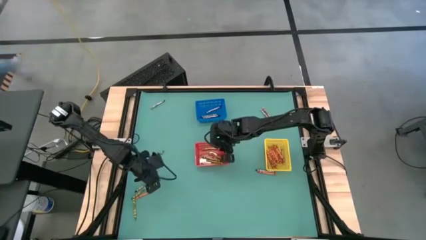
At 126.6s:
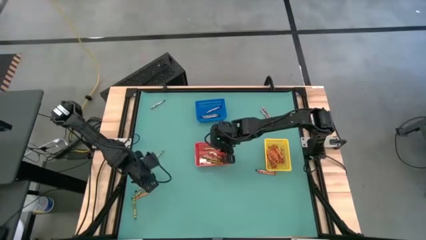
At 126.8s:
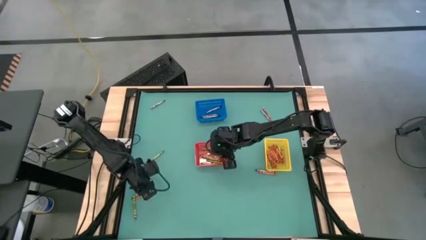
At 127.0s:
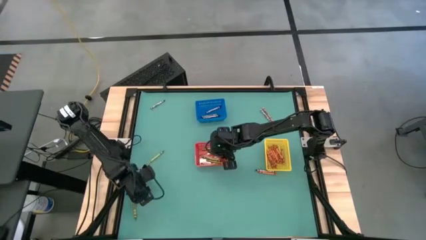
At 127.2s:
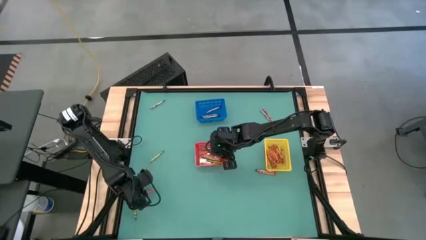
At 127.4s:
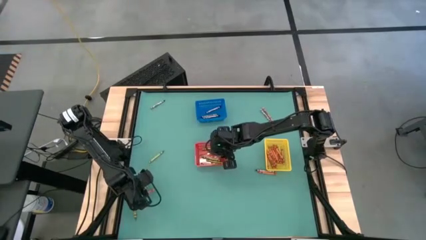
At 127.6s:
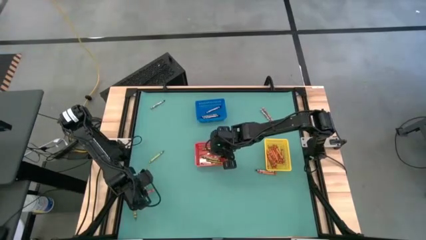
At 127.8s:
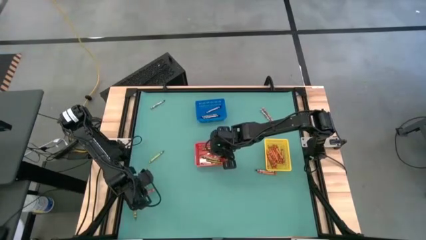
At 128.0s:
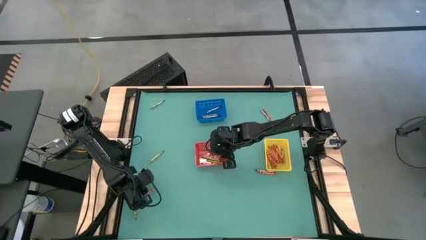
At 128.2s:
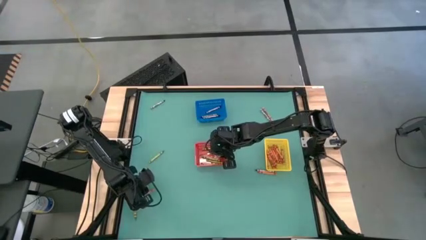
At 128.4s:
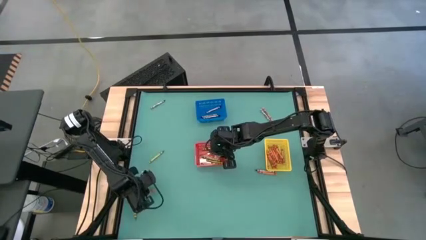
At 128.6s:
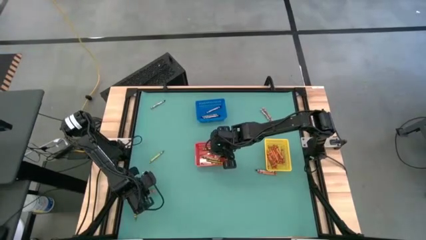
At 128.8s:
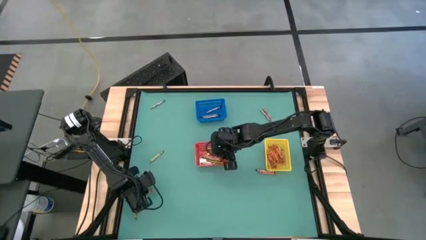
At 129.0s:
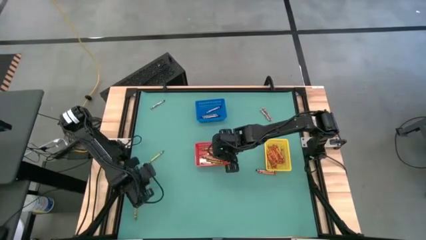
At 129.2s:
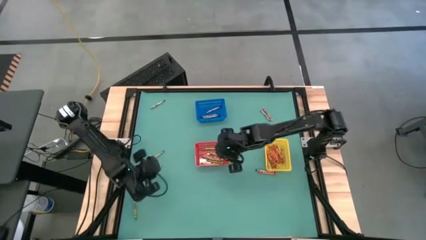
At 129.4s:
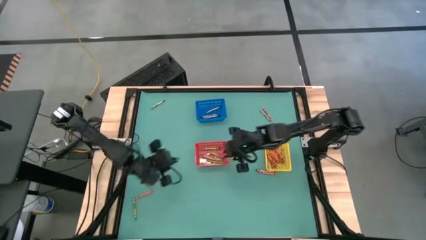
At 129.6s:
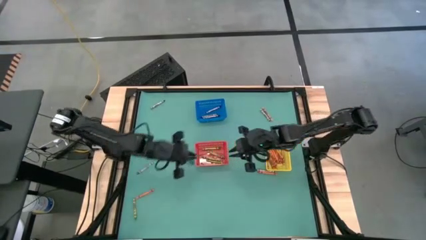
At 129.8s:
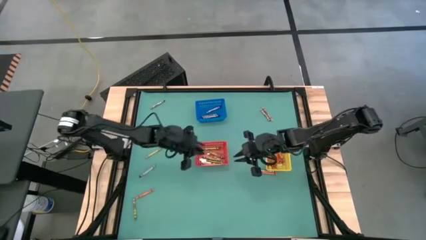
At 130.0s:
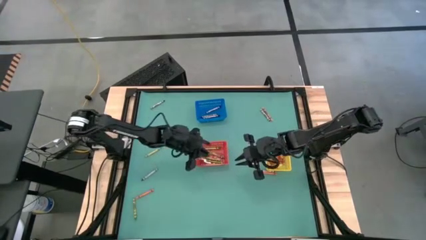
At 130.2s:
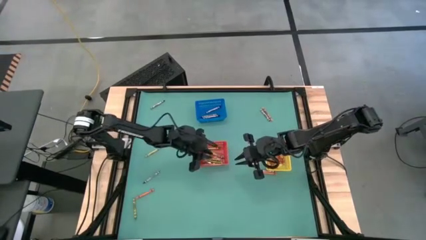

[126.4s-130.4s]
Task: Sort crayons
Put the green crayon into the red bin

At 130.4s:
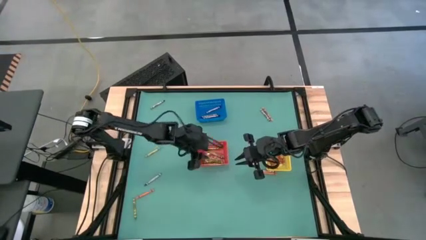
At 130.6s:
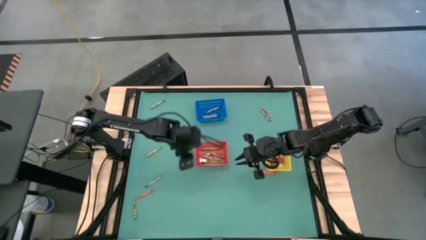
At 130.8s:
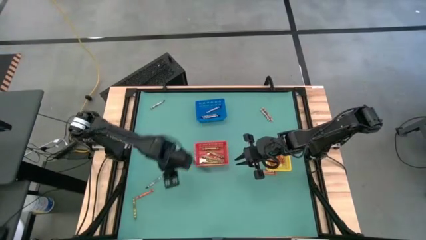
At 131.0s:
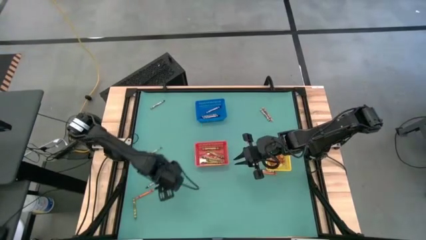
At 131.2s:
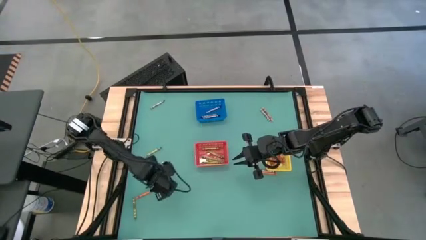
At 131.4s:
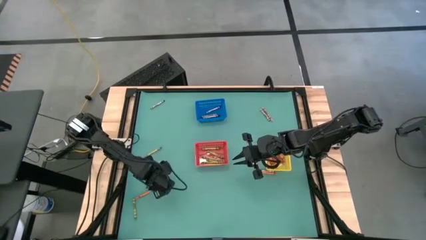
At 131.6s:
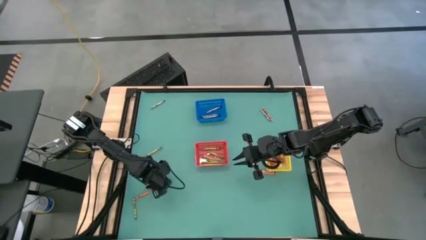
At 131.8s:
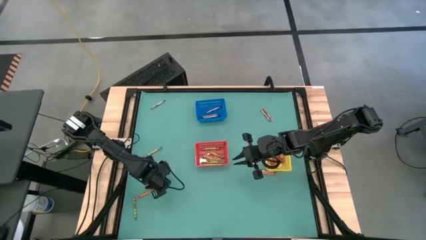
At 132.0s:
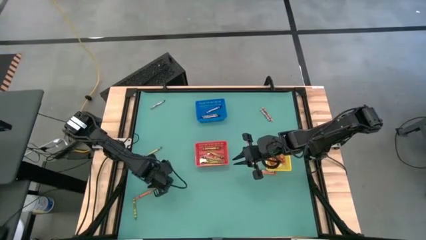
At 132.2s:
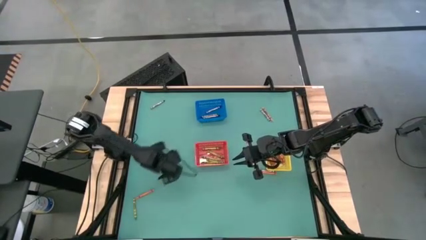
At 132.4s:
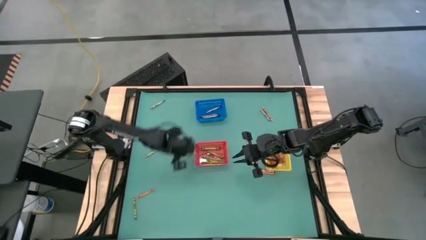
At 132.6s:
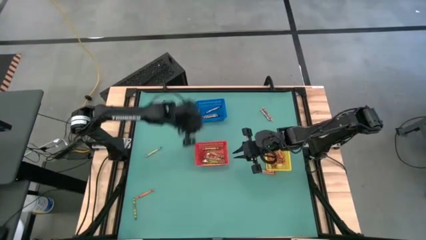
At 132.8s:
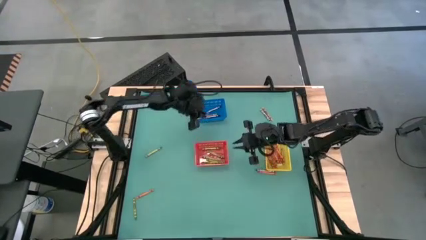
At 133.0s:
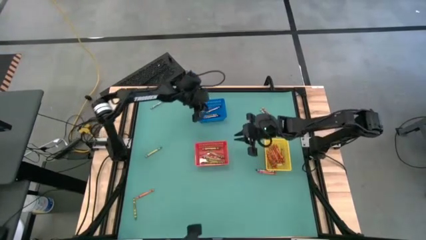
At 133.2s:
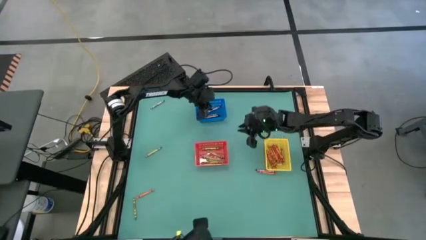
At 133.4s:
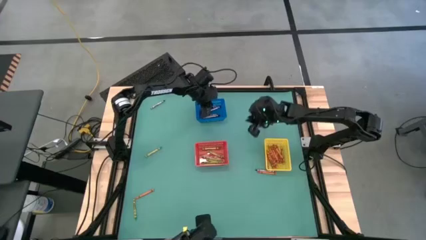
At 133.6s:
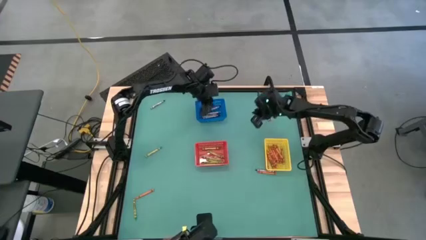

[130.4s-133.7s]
Put the black crayon into the blue bin

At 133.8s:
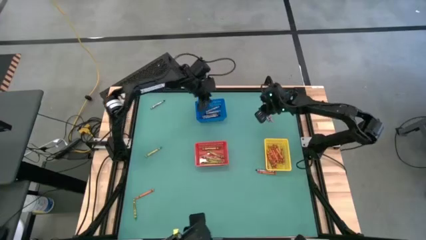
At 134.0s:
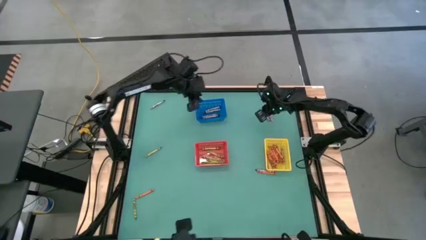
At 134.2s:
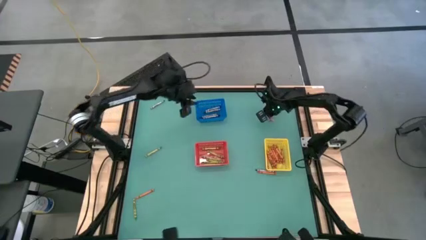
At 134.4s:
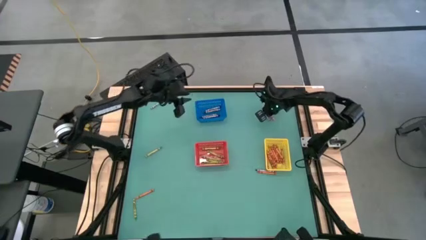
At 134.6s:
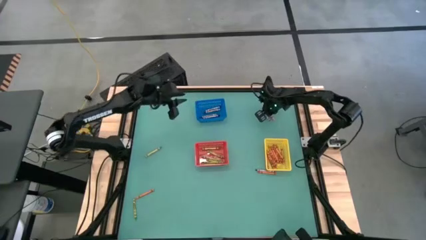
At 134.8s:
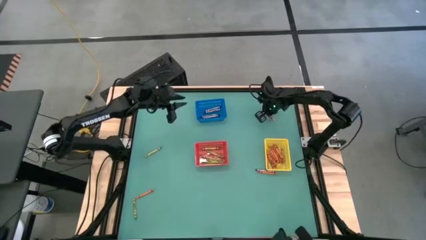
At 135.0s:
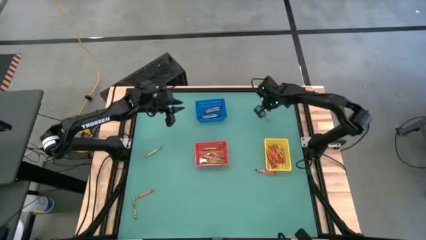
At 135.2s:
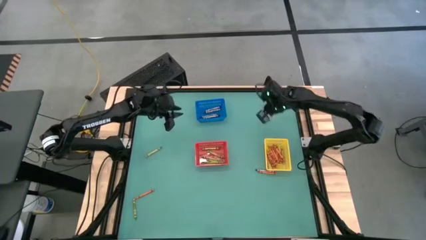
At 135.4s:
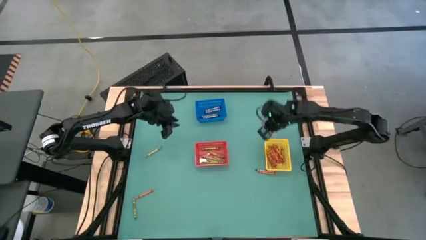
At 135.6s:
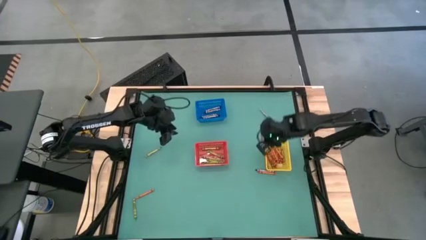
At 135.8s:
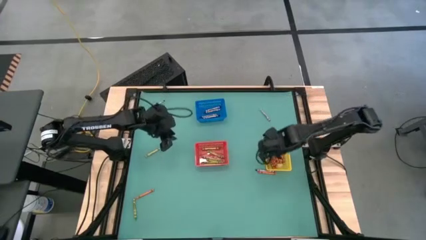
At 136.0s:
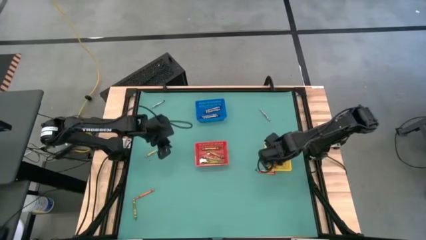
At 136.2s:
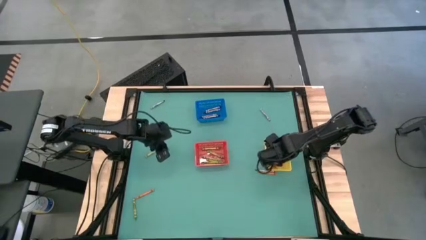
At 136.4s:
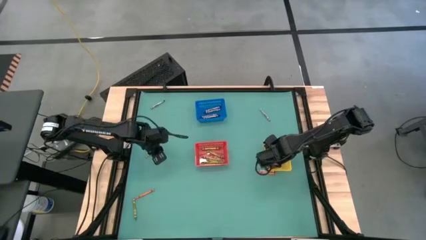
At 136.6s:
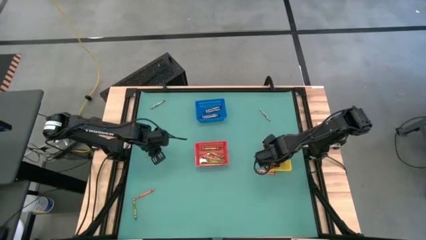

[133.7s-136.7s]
Put the orange crayon into the yellow bin

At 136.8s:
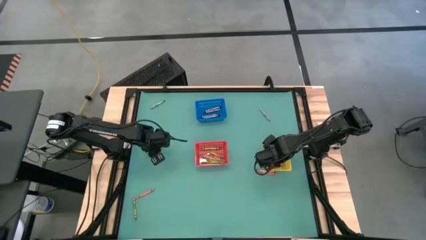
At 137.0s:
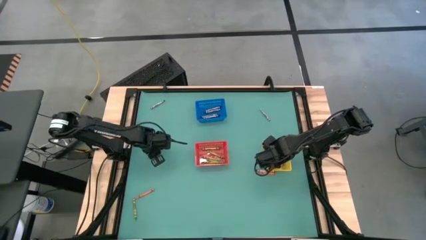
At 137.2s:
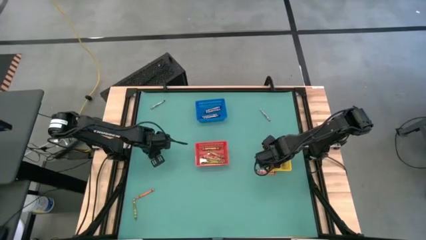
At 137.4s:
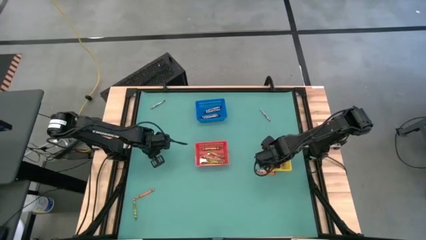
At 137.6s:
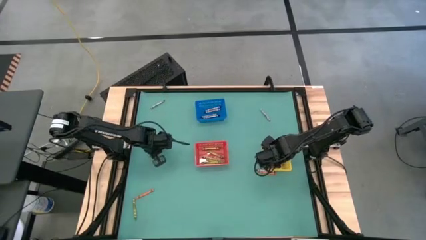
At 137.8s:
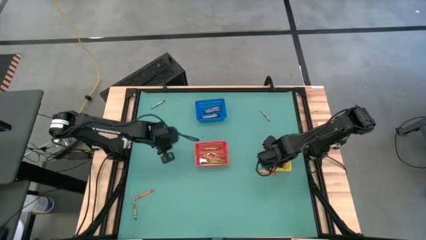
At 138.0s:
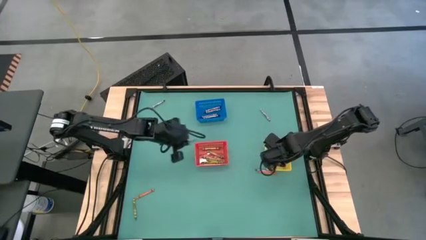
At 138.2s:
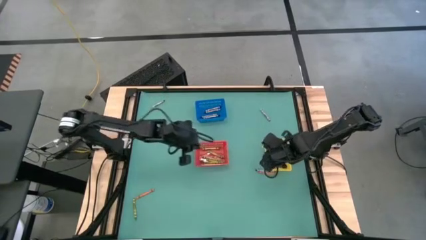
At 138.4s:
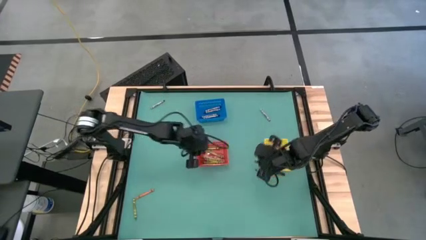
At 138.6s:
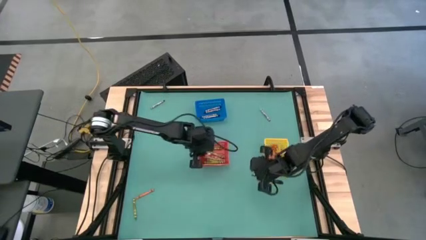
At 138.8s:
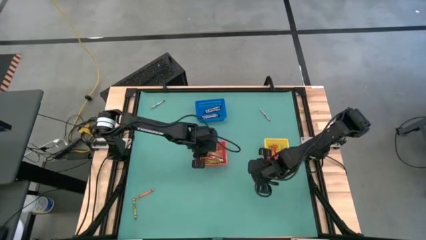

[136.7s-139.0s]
Put the green crayon into the red bin

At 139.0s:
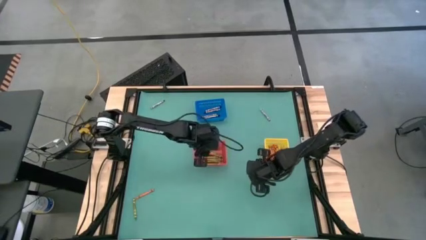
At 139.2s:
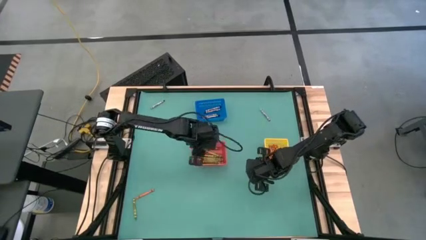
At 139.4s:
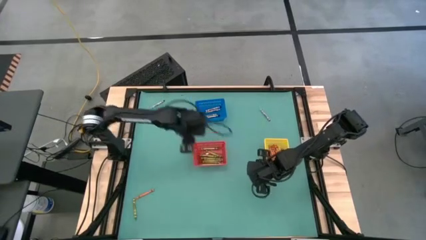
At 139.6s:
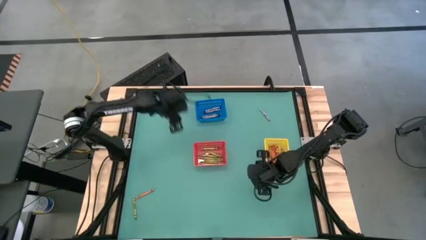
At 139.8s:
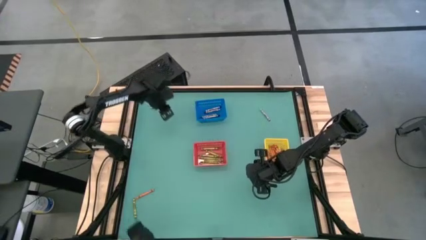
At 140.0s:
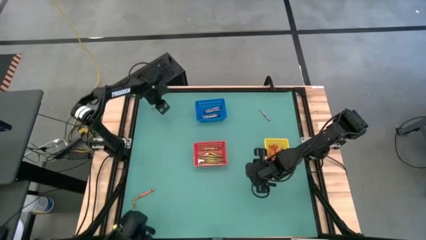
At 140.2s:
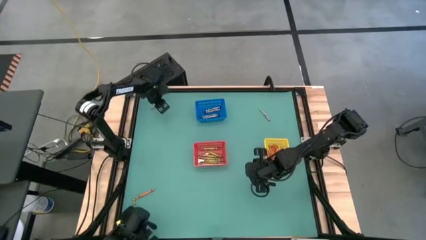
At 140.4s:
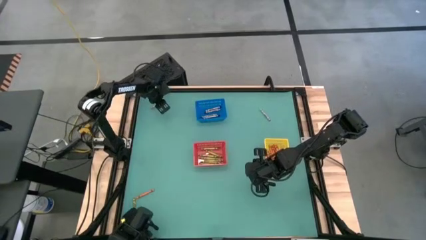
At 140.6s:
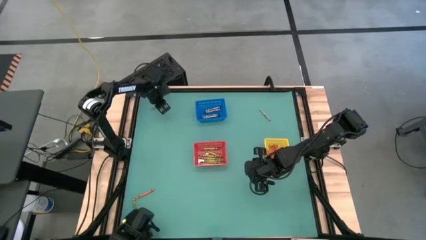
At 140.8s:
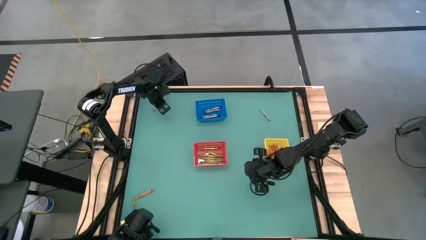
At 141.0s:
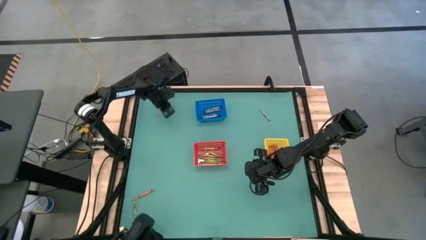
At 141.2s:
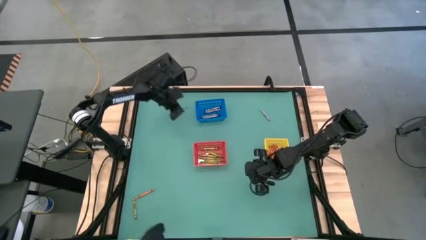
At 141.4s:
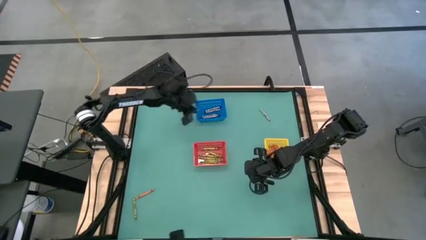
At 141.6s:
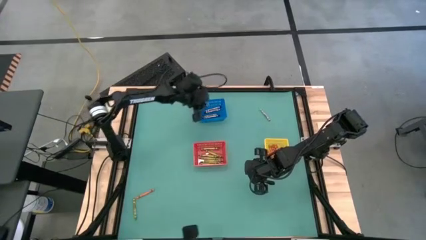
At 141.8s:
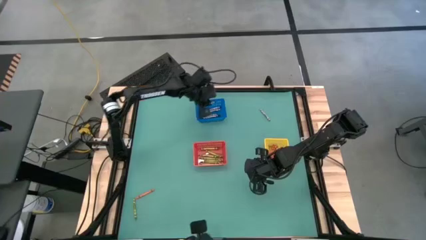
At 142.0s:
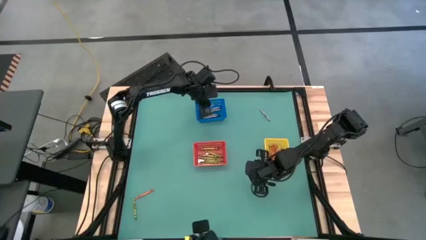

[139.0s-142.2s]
Put the black crayon into the blue bin
